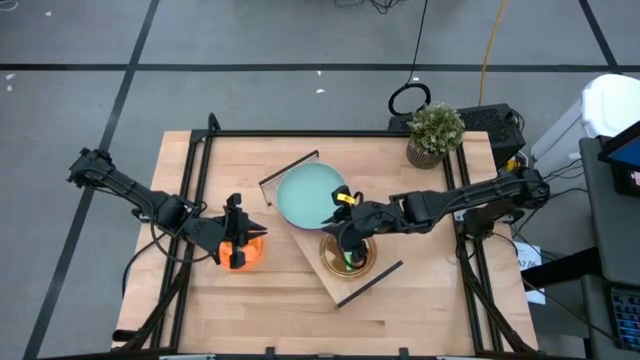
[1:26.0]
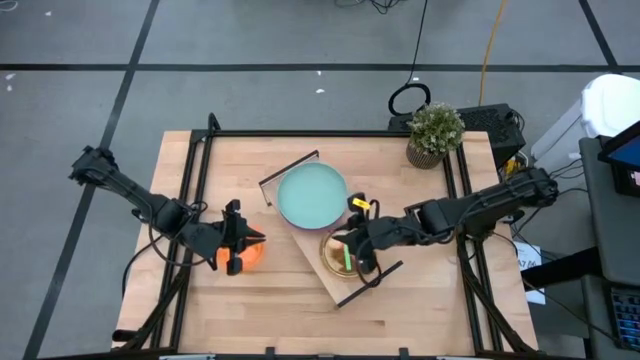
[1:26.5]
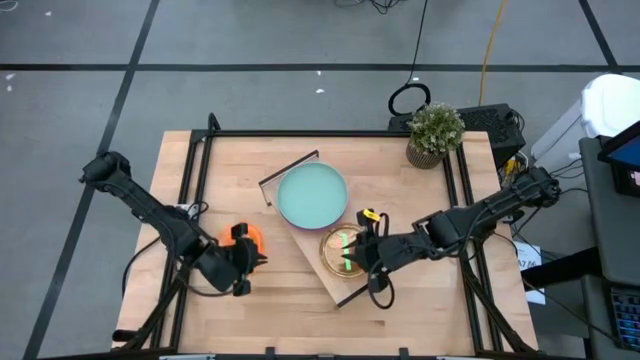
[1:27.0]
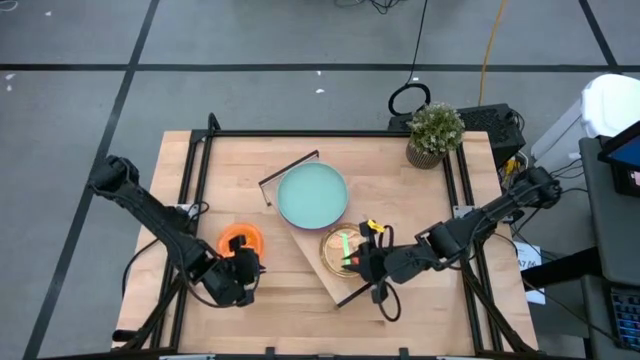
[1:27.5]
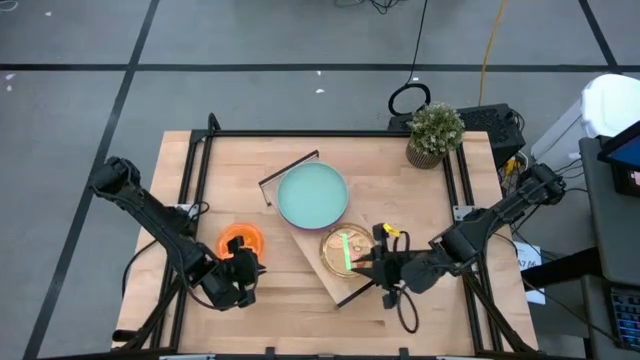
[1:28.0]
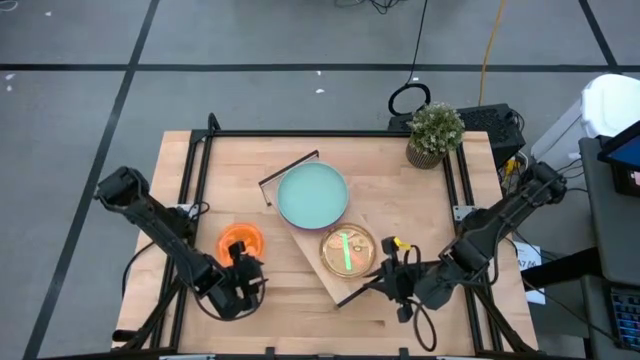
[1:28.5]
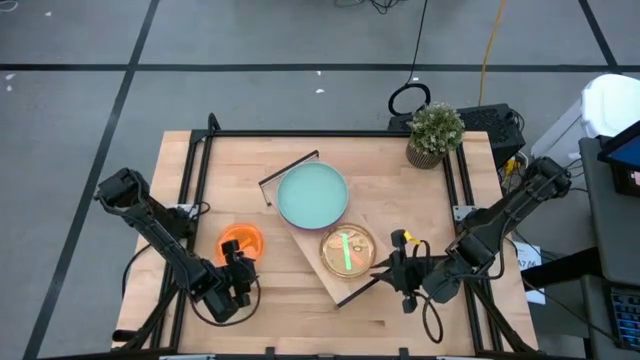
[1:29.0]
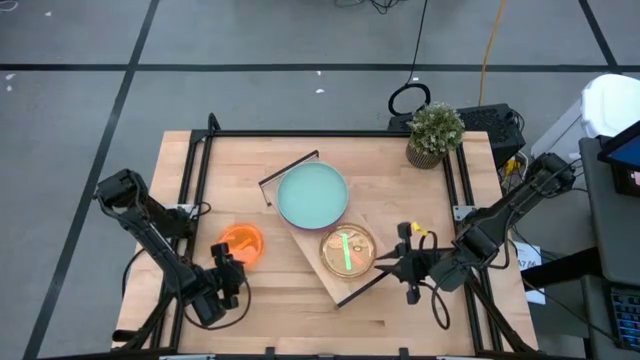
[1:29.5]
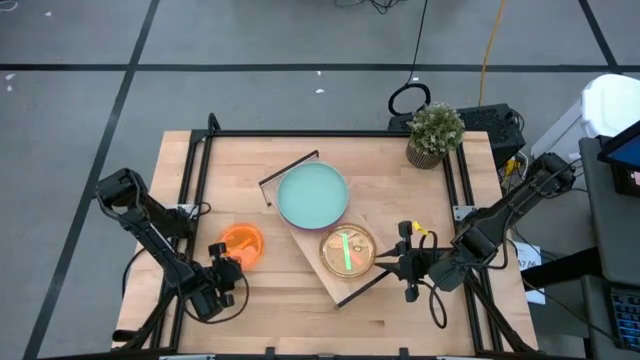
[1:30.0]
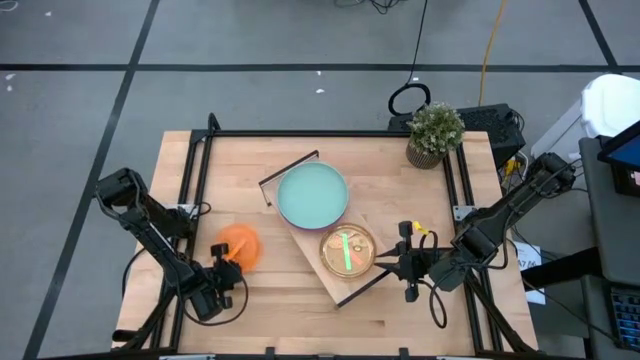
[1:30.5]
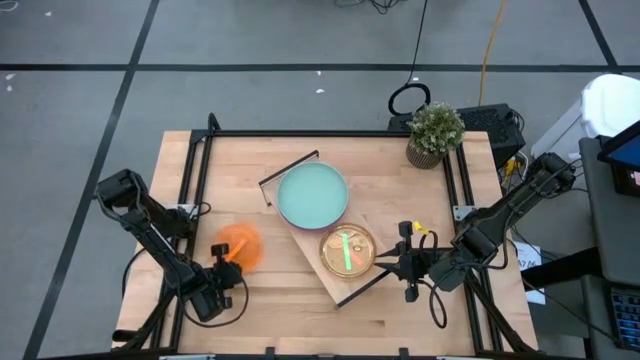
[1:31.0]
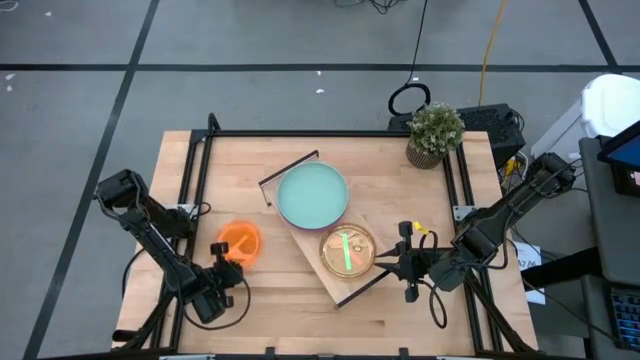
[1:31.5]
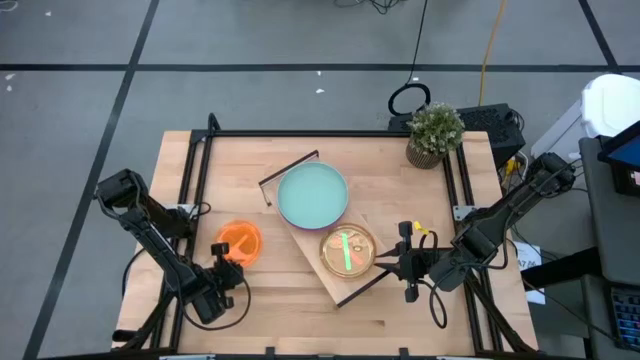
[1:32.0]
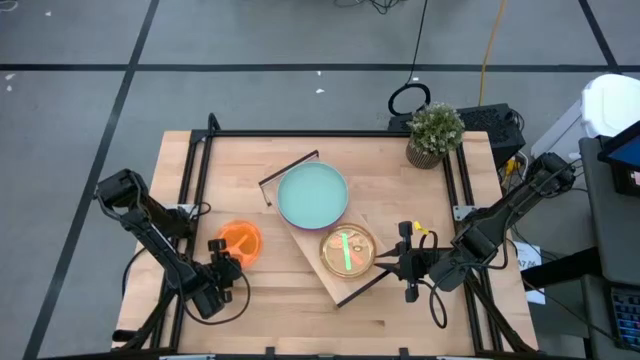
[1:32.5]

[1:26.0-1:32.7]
Task: Place and stack plates onto a shelf
Stack the orange plate on top of the green plate on the shelf

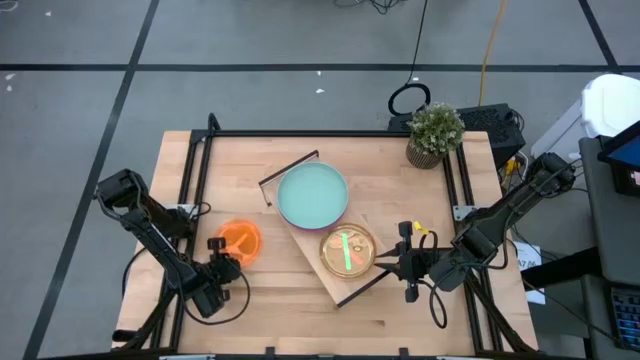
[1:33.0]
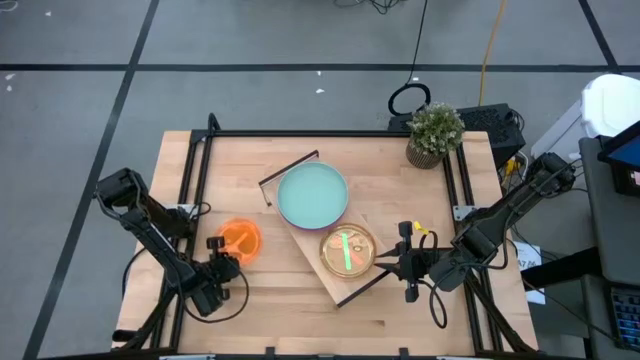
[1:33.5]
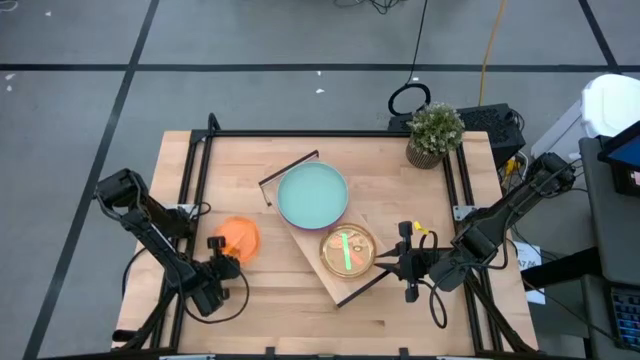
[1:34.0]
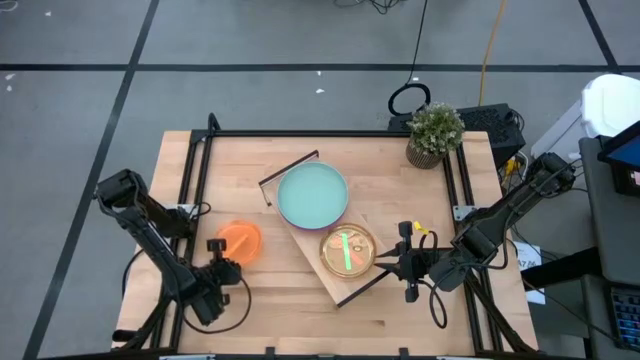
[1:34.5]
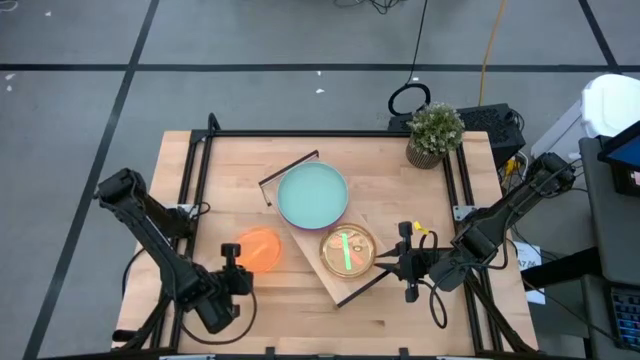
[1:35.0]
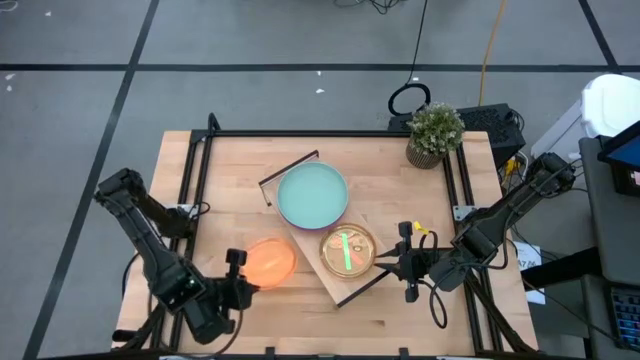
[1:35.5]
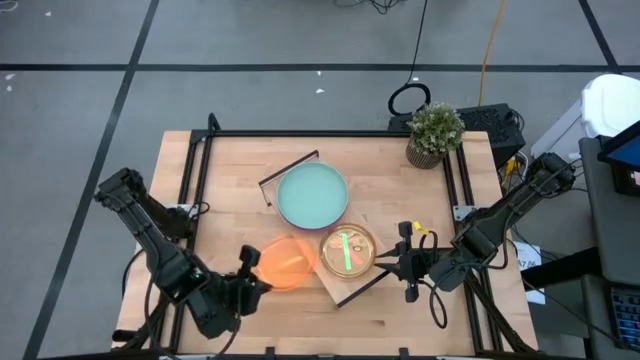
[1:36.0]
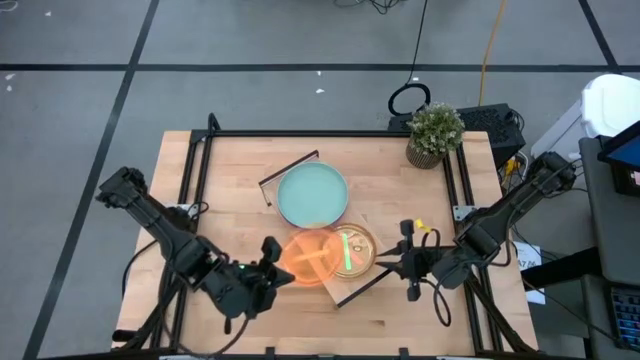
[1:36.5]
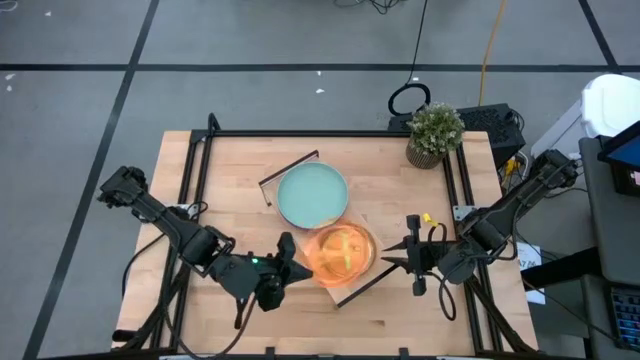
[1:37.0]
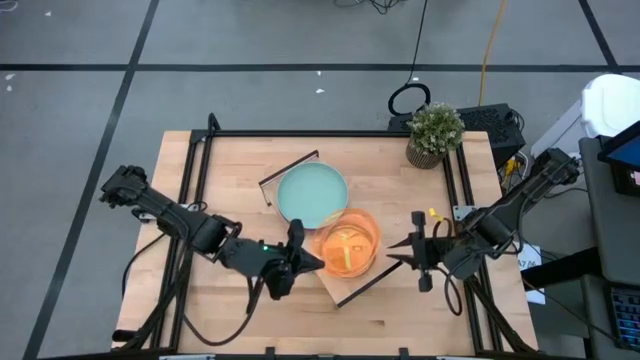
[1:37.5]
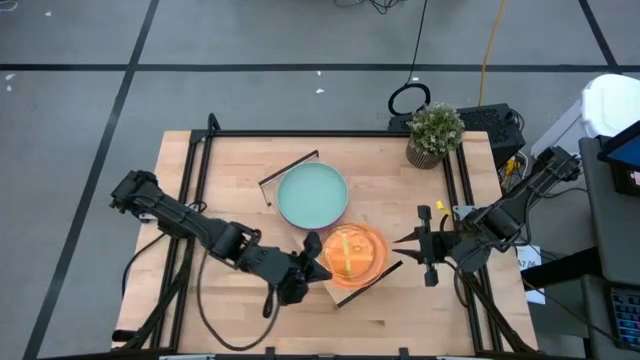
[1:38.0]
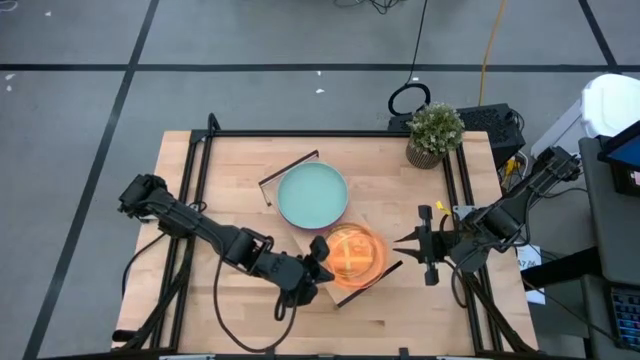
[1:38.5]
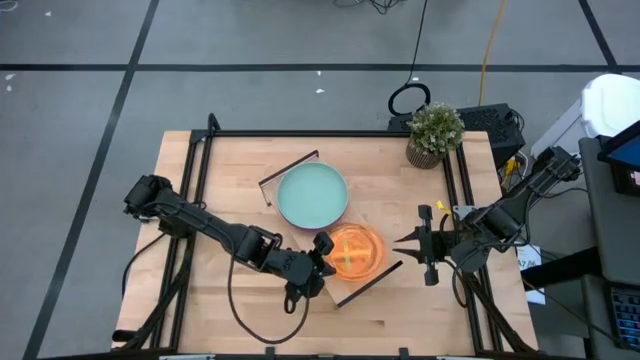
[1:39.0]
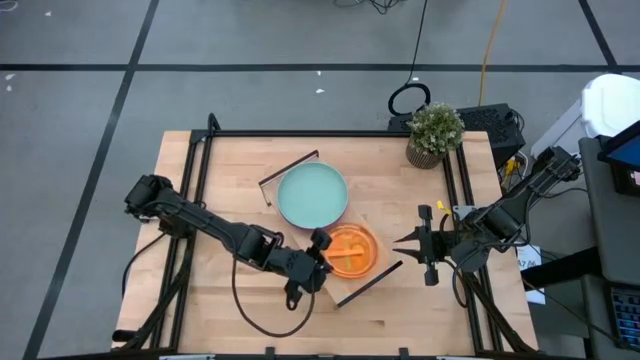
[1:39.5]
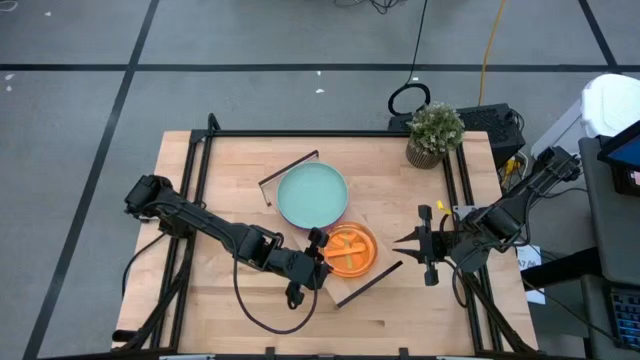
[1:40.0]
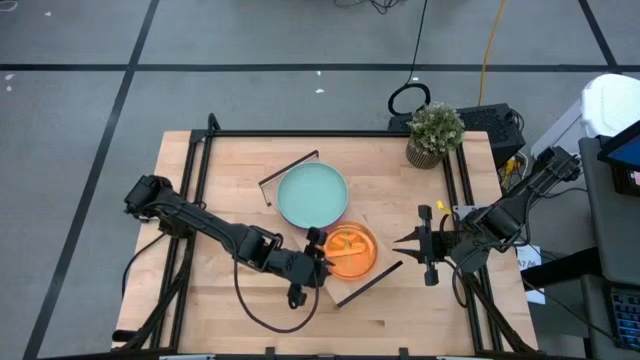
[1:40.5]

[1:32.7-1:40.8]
Stack the orange plate on top of the green plate on the shelf

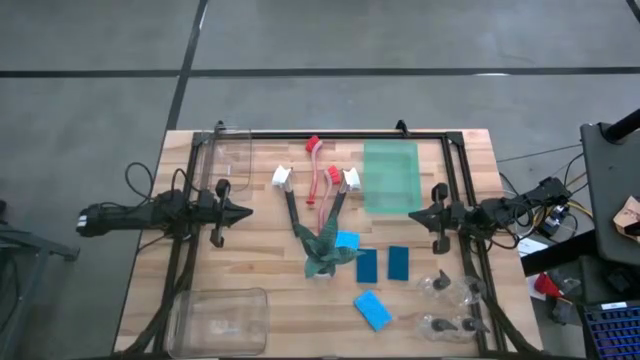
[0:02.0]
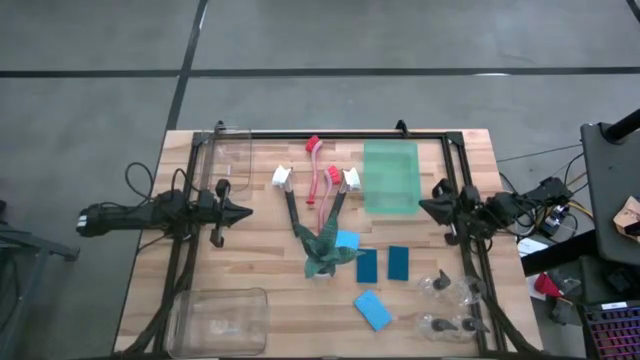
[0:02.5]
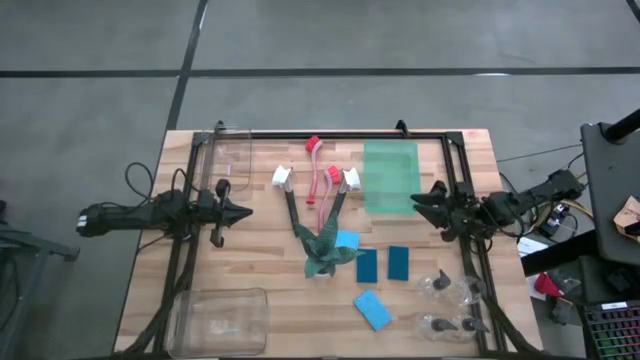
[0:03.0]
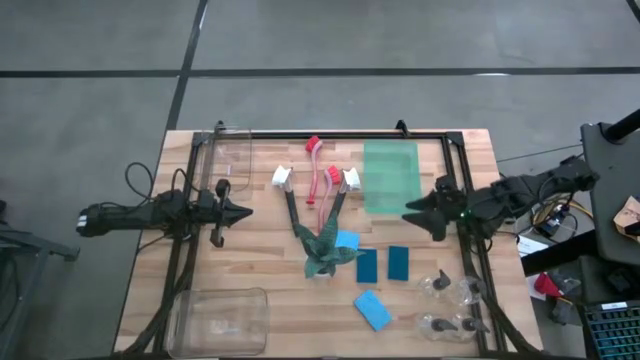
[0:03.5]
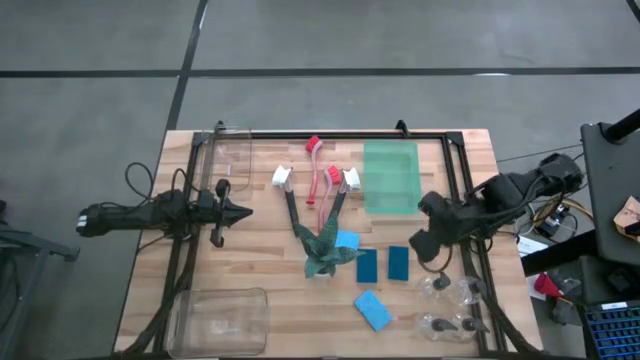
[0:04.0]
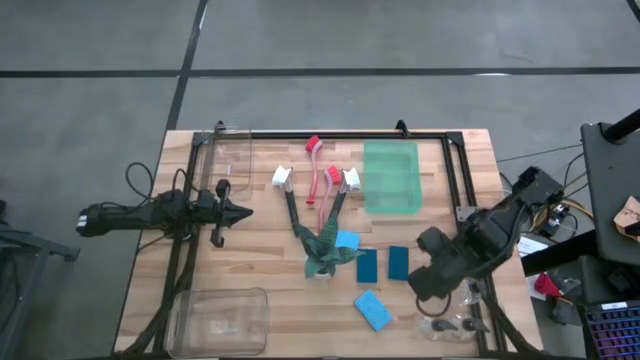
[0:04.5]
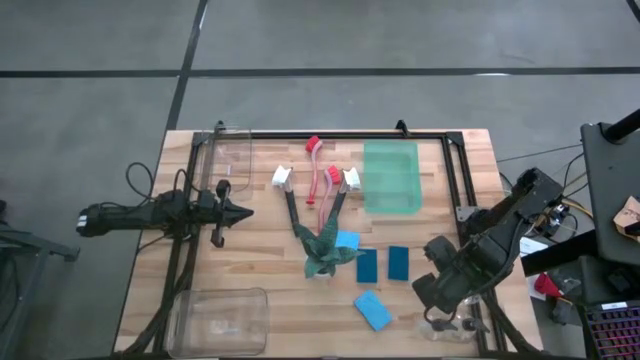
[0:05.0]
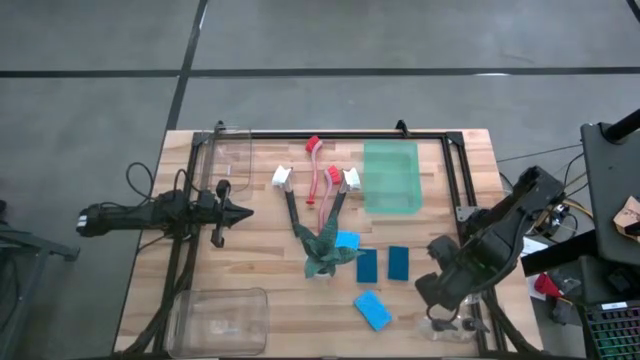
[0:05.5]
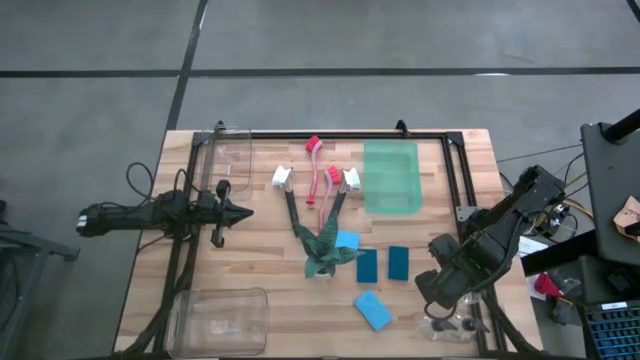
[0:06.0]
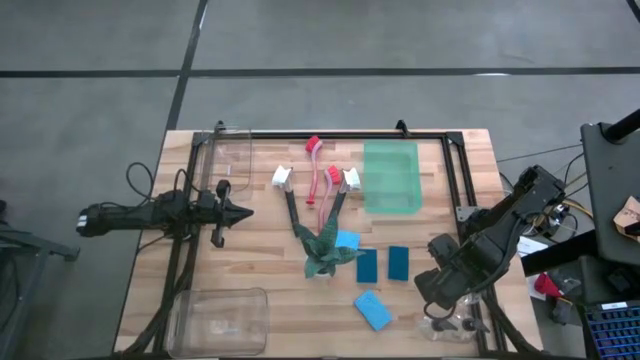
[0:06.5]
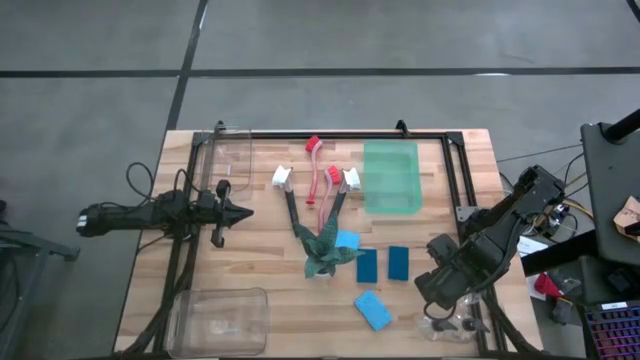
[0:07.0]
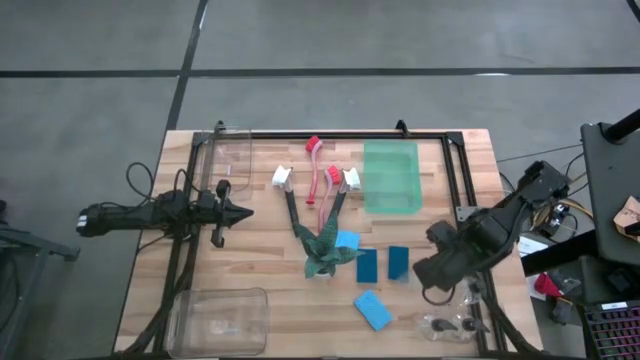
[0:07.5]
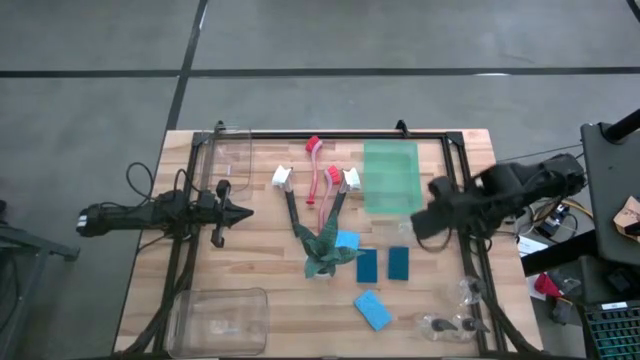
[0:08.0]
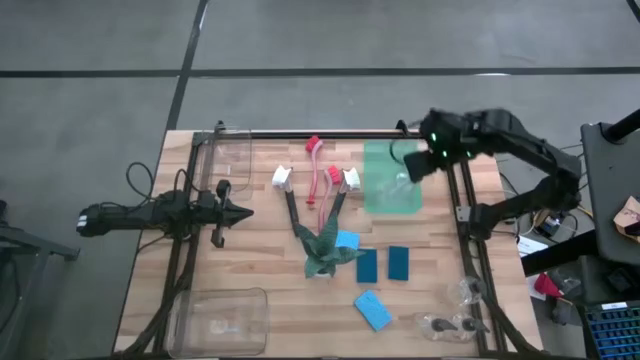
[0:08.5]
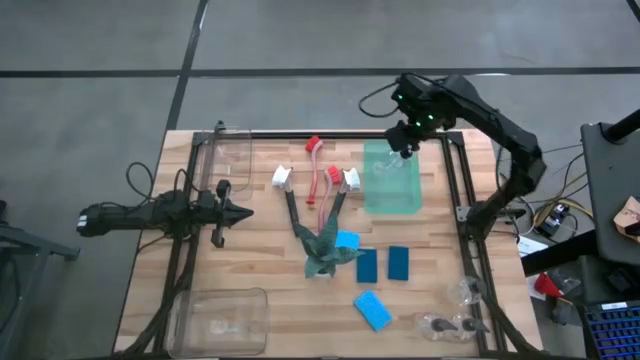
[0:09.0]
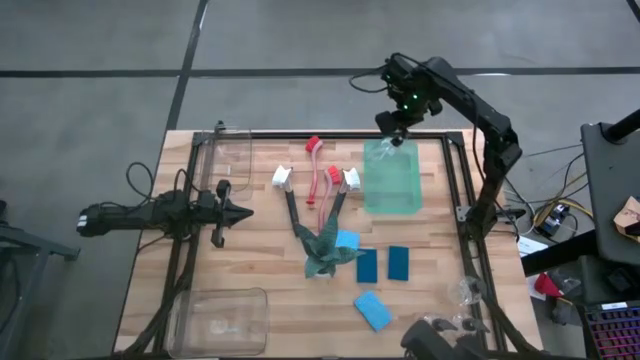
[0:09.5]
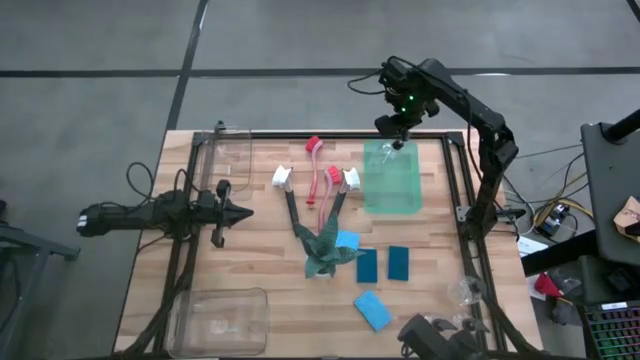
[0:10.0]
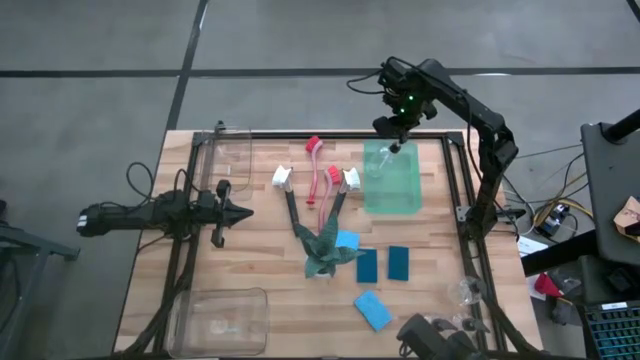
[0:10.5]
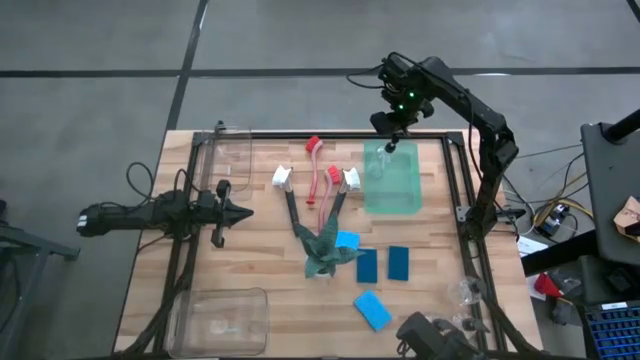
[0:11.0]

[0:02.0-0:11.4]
Task: Pick & Place Kitchen Sink Supplies
Put the soap dispenser into the green bin
